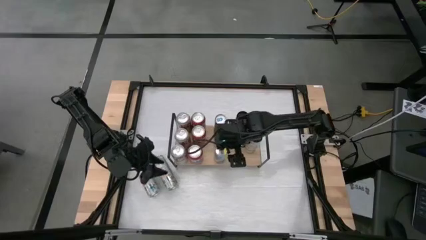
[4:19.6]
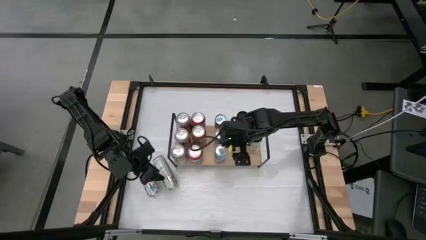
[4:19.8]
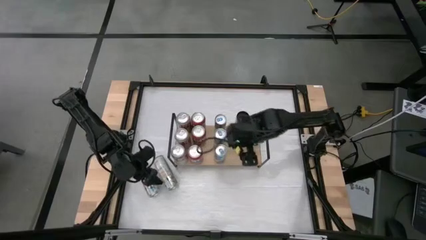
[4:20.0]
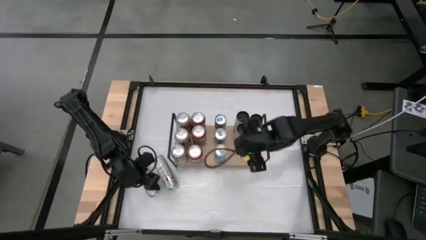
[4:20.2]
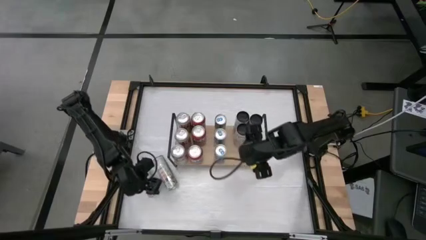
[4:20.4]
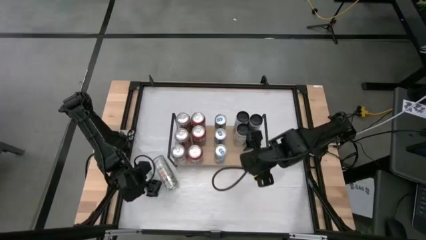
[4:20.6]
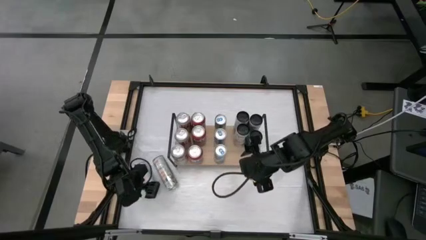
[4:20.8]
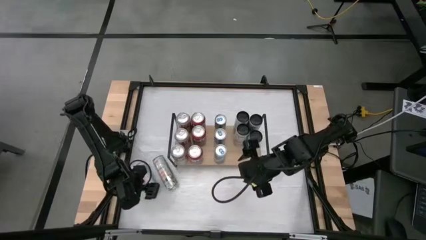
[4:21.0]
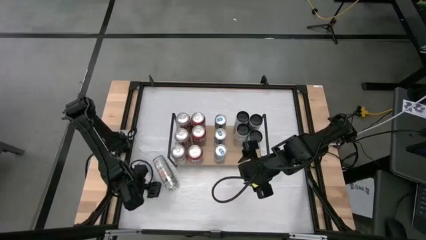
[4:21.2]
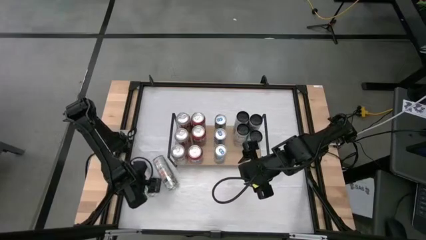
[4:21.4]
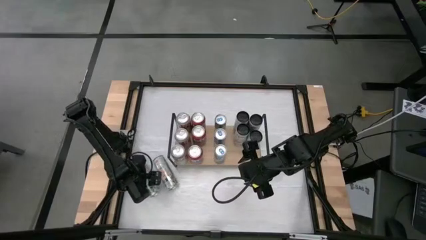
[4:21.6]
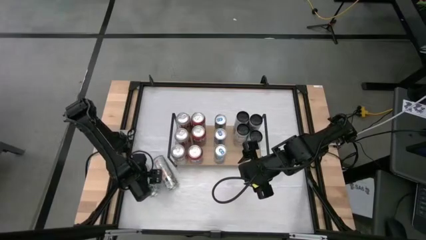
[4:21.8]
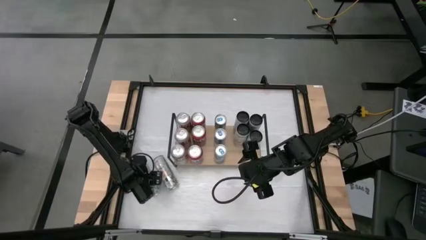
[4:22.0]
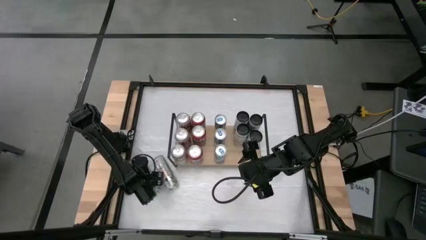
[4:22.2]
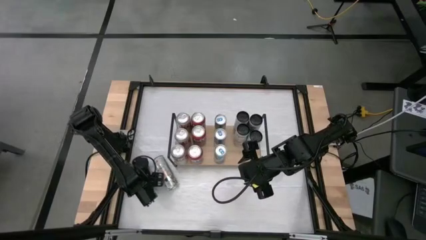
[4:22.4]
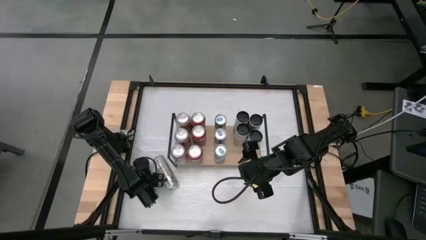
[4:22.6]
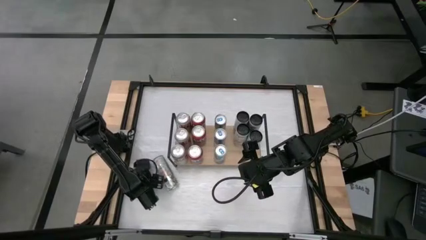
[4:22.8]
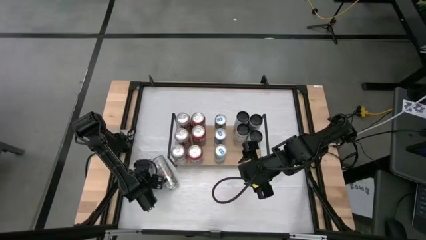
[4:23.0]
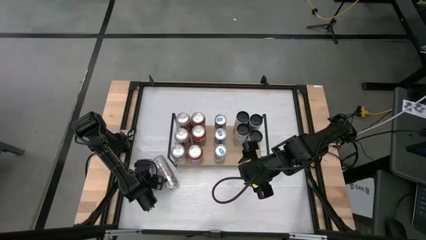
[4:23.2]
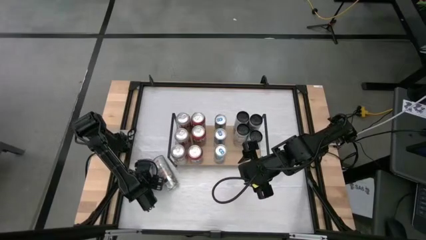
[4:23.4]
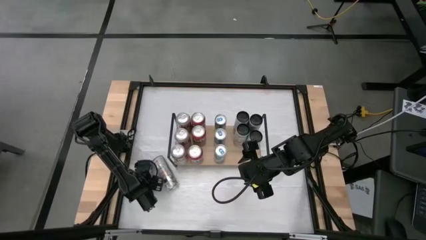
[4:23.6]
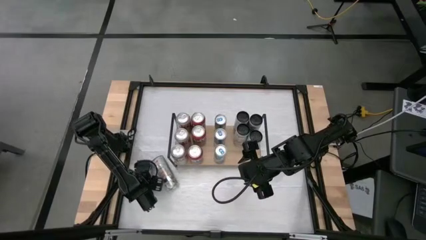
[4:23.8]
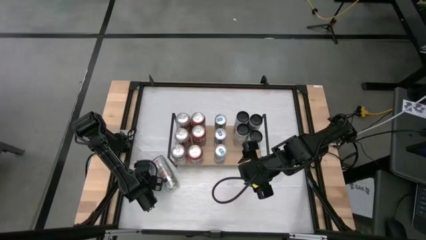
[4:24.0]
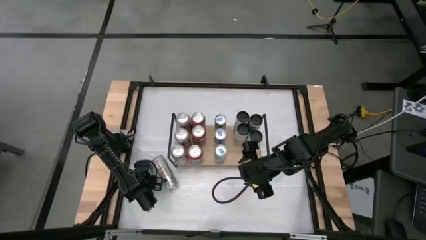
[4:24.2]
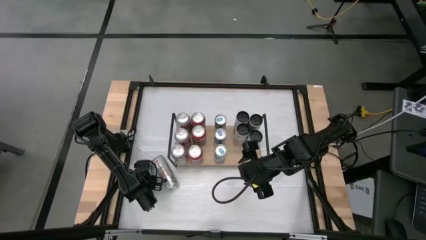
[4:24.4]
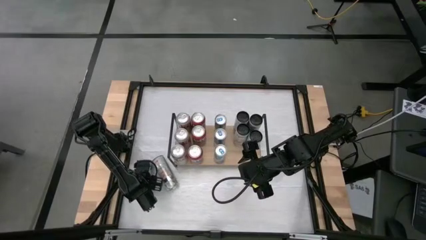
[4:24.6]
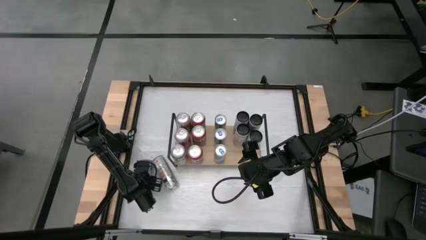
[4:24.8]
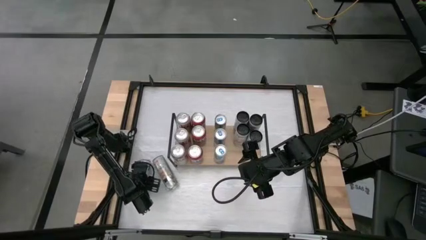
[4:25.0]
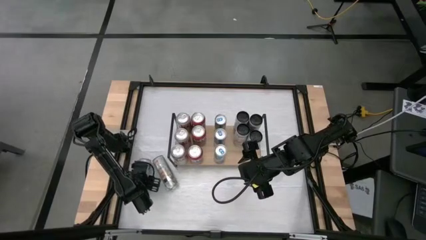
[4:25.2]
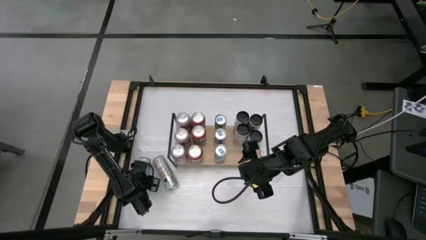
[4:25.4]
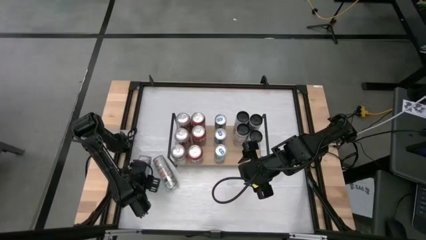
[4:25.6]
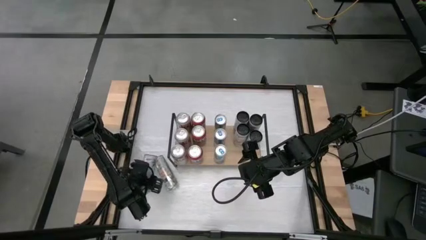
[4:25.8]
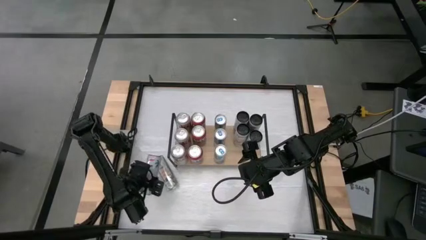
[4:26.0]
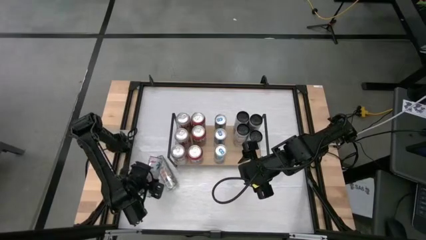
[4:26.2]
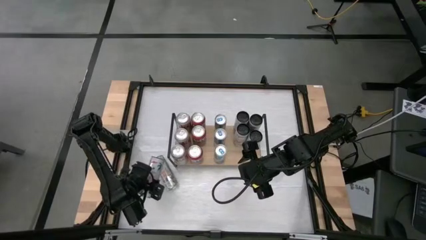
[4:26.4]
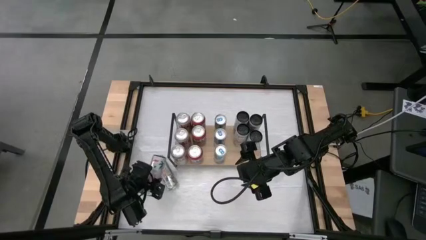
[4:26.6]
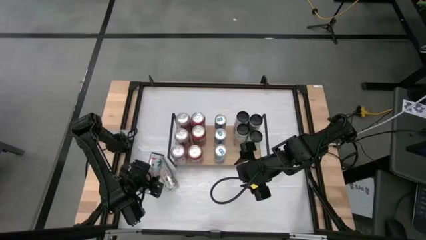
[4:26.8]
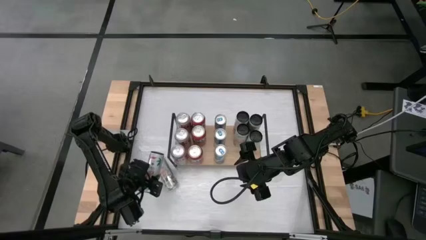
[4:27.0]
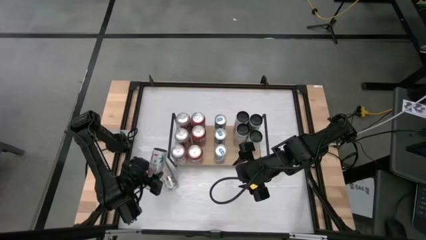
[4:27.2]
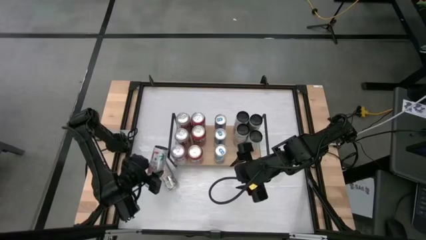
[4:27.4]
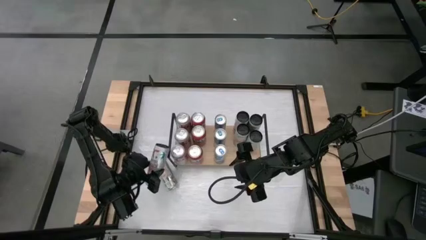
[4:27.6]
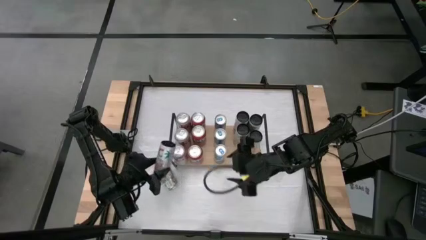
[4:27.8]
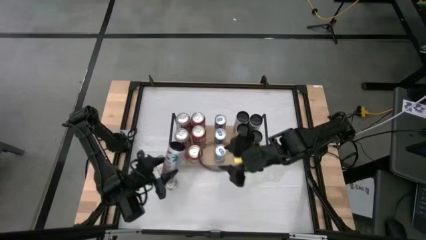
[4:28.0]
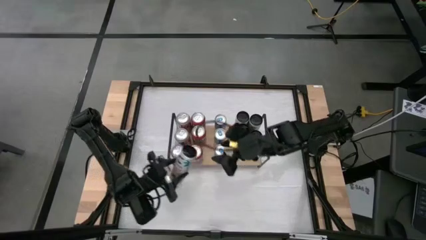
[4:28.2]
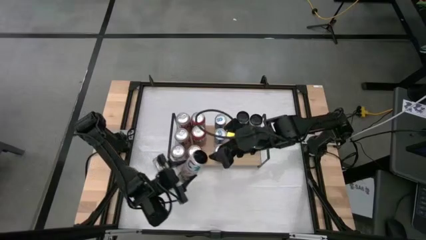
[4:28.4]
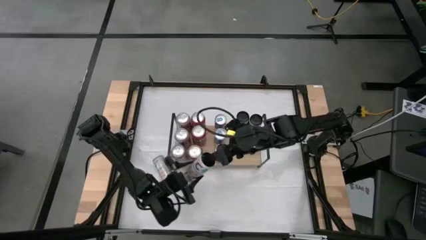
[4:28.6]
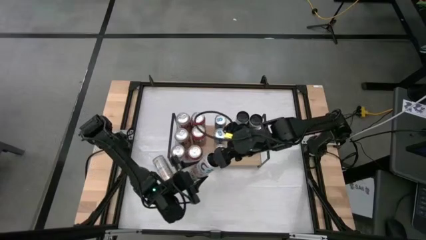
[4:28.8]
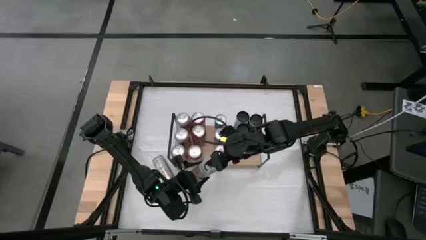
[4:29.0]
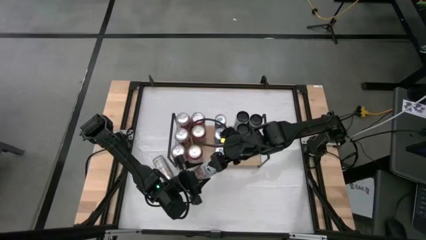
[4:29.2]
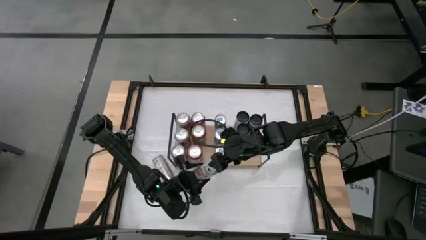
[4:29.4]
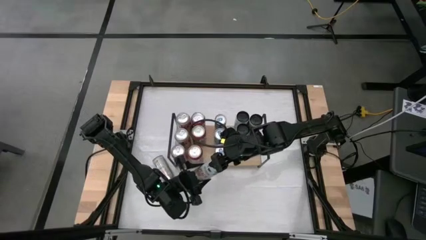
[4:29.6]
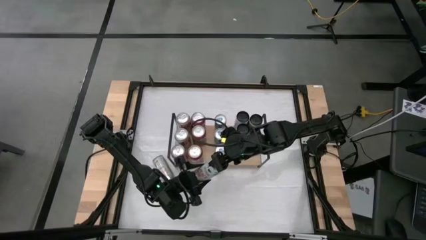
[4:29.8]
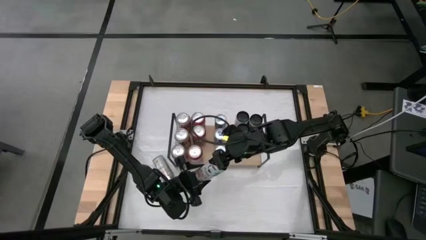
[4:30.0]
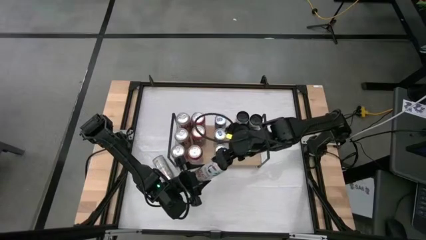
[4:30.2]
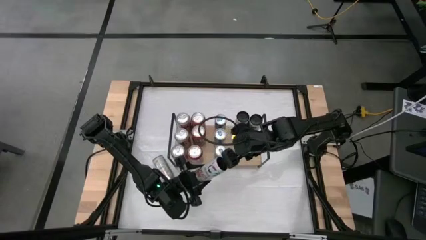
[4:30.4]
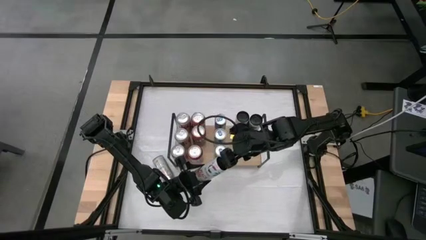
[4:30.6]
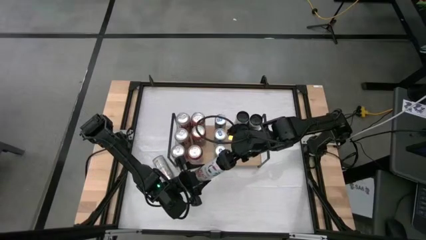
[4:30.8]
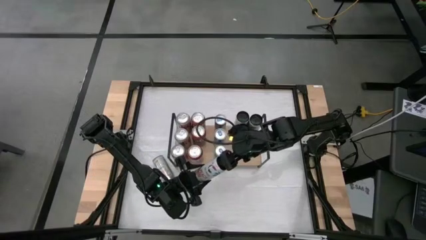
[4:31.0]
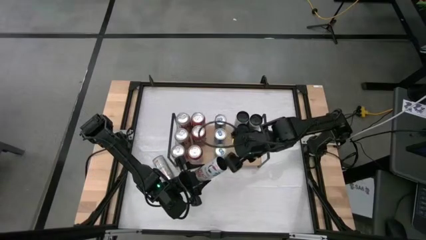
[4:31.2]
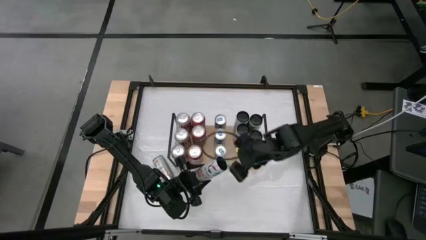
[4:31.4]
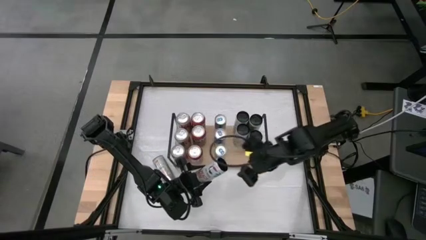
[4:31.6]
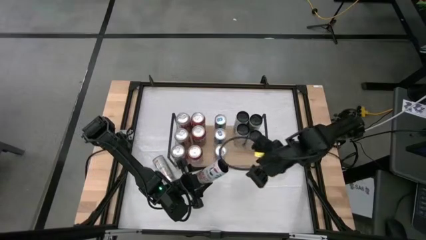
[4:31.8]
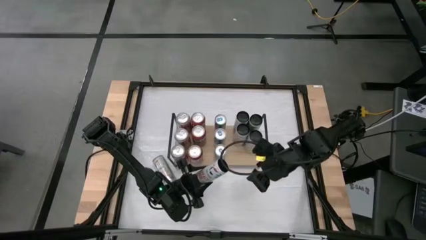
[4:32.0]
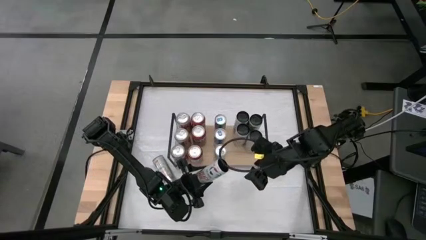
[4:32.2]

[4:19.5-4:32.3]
Task: Place canned beverage on shelf
Put the white-pink soda can on the shelf aligned with the other white-pink soda can
